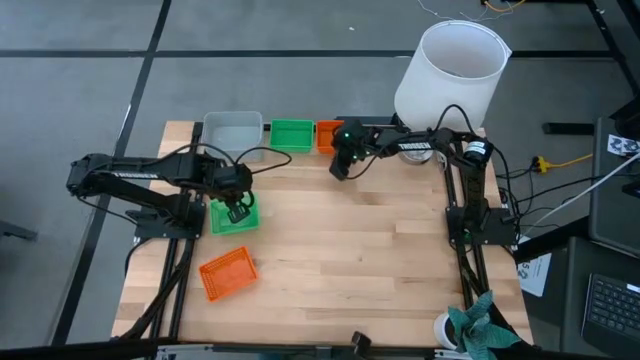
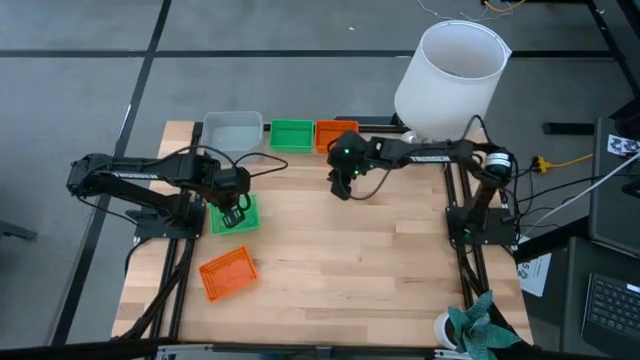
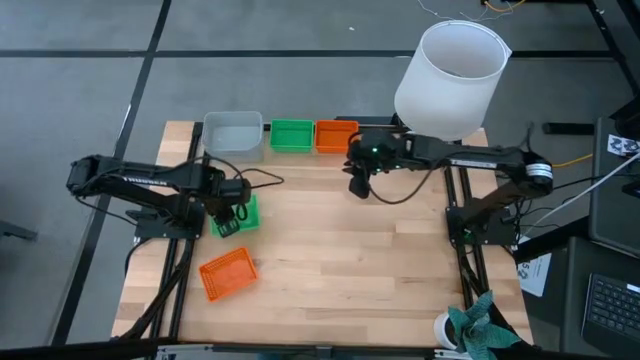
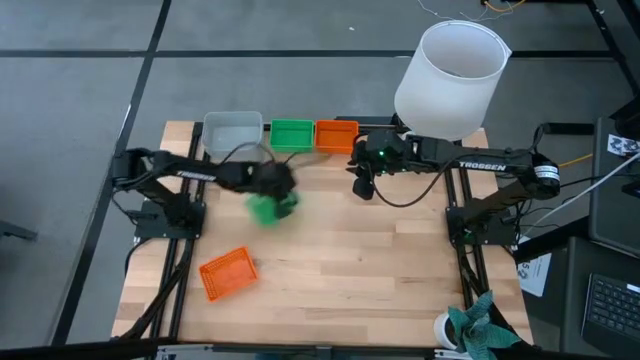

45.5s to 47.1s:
Adjust the green bin

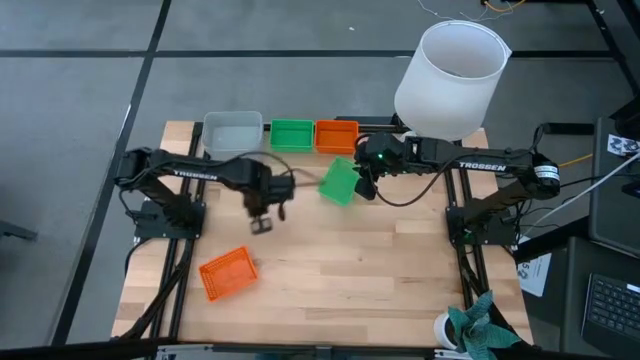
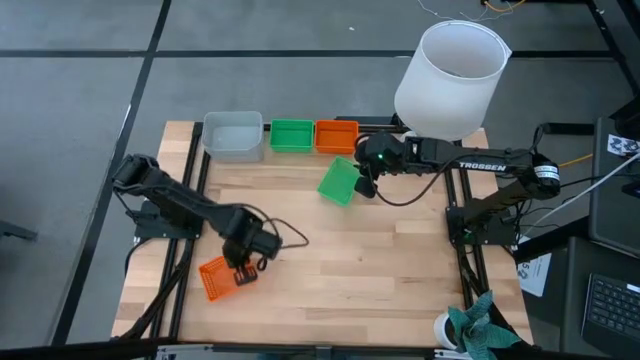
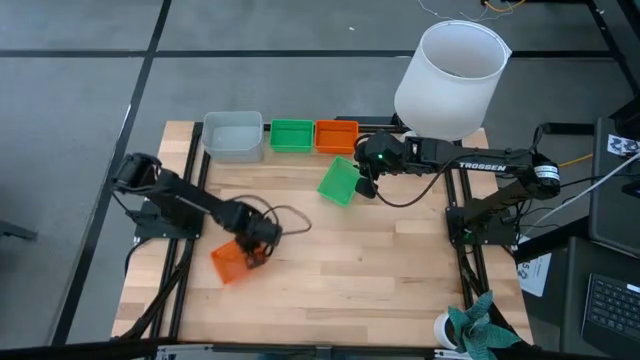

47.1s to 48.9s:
Adjust the orange bin

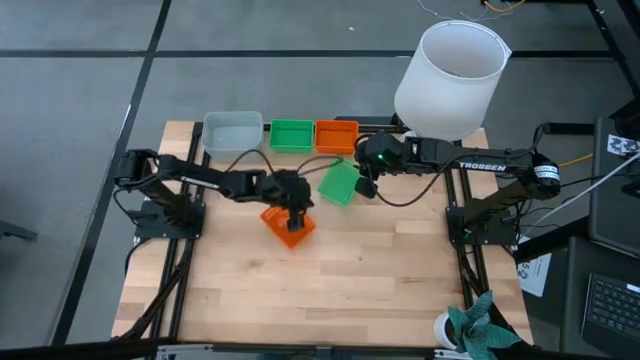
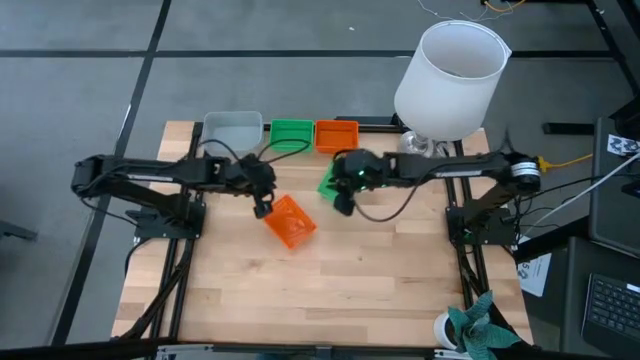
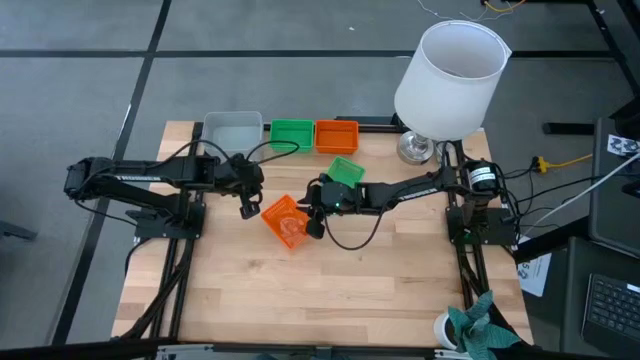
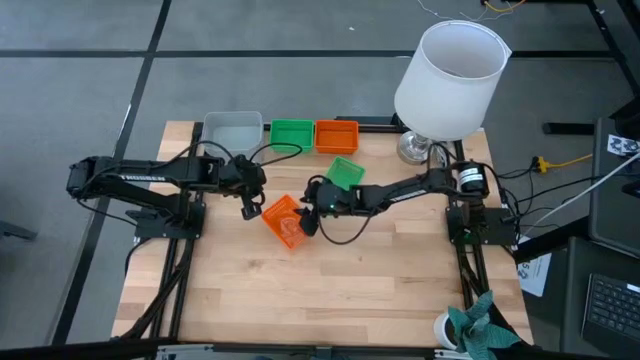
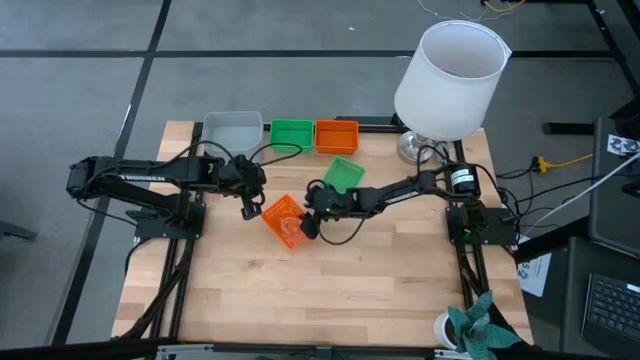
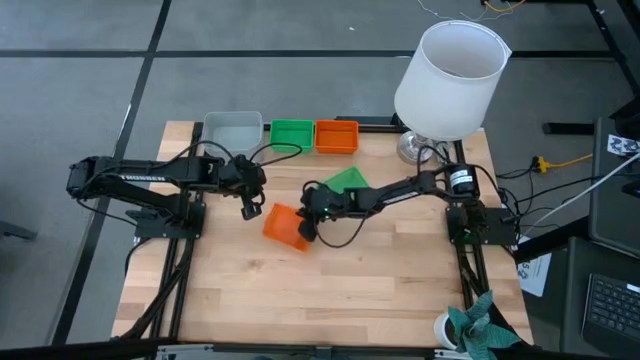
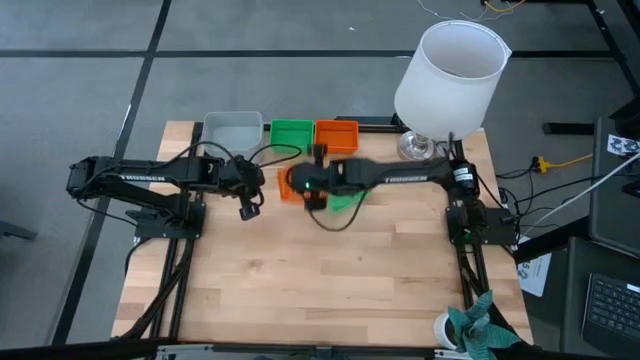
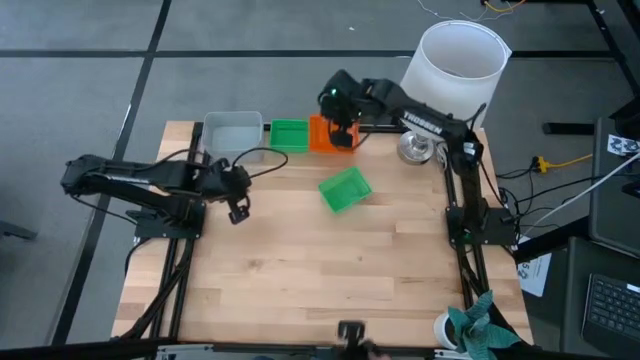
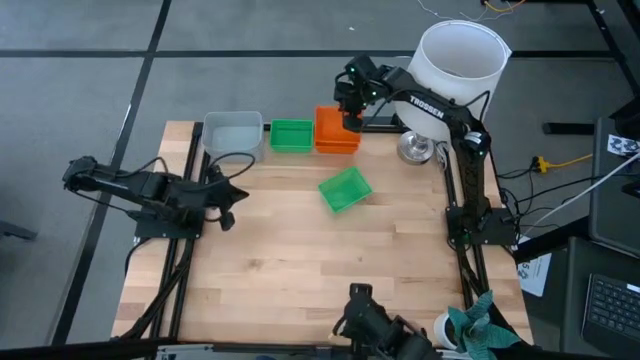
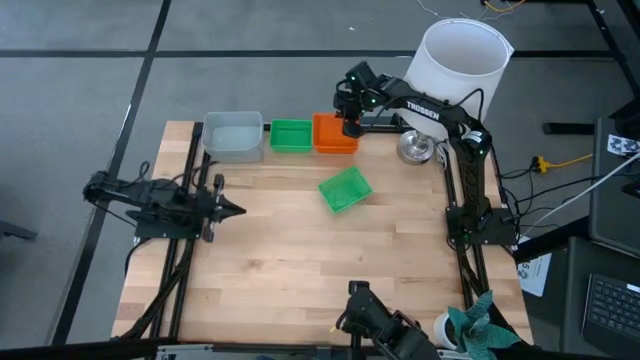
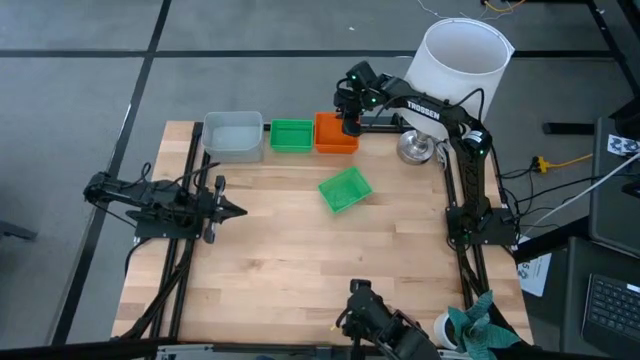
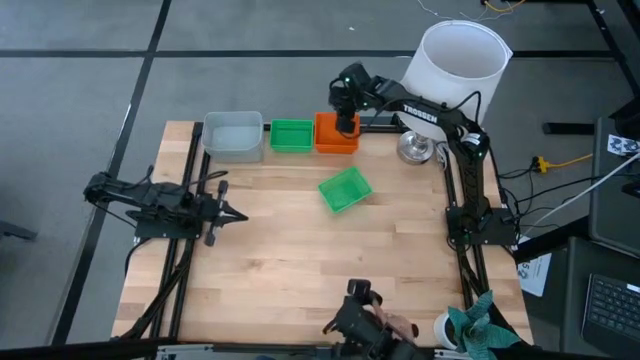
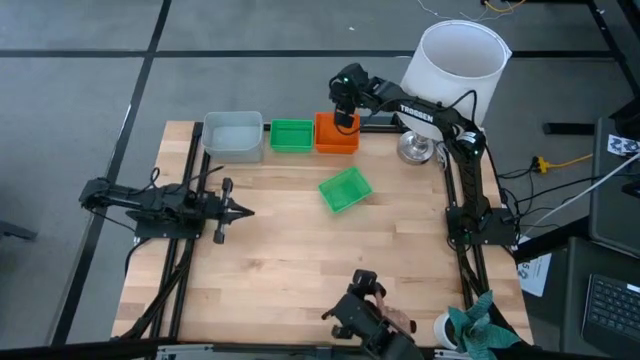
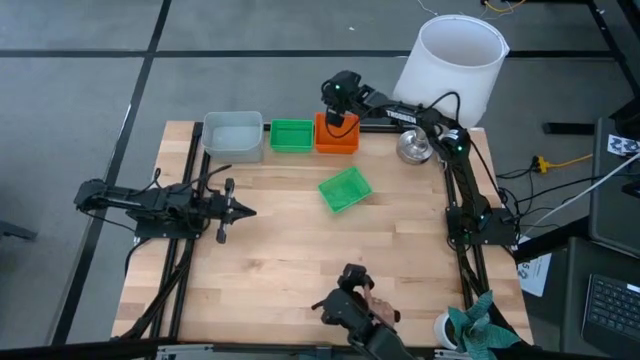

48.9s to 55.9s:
Stack the orange bin into the top orange bin

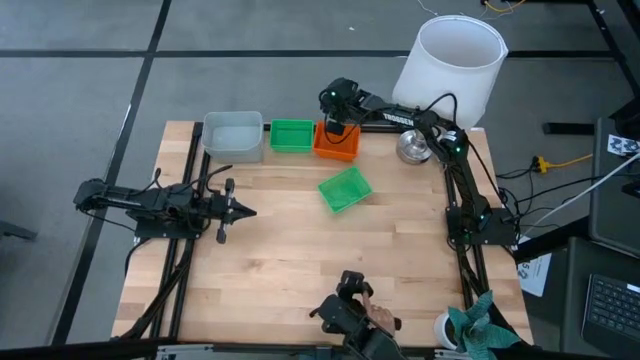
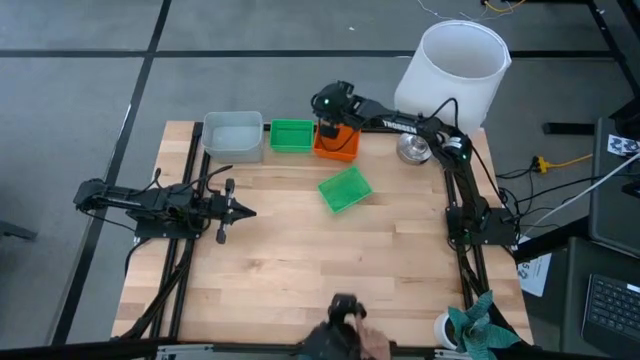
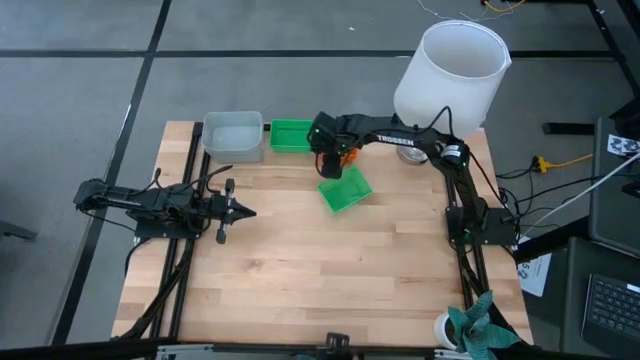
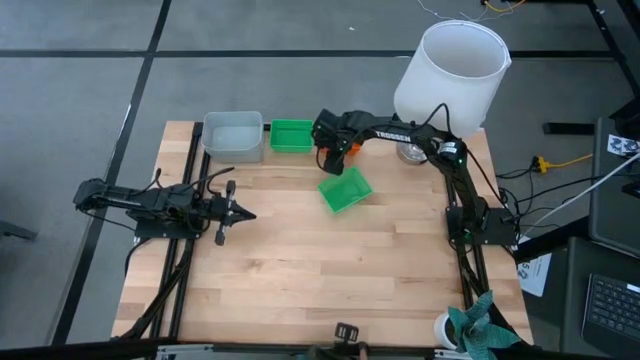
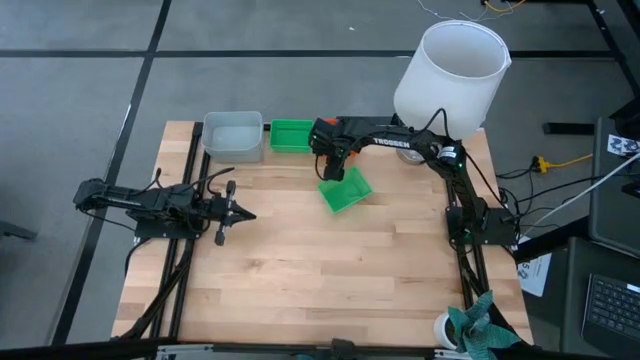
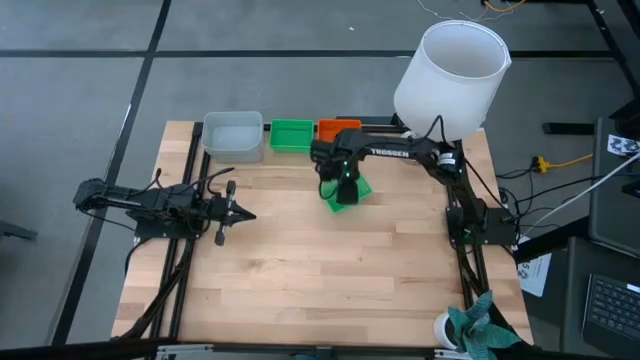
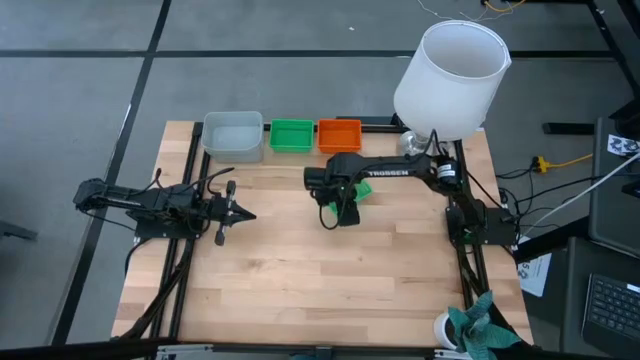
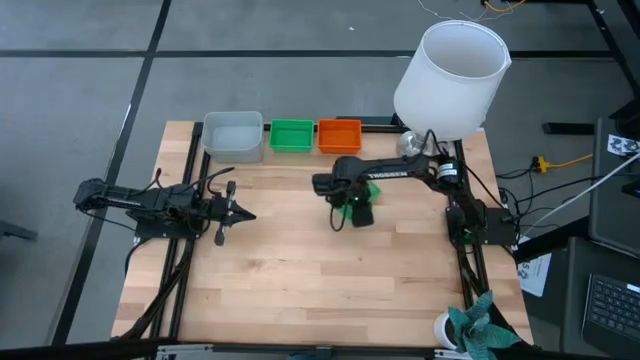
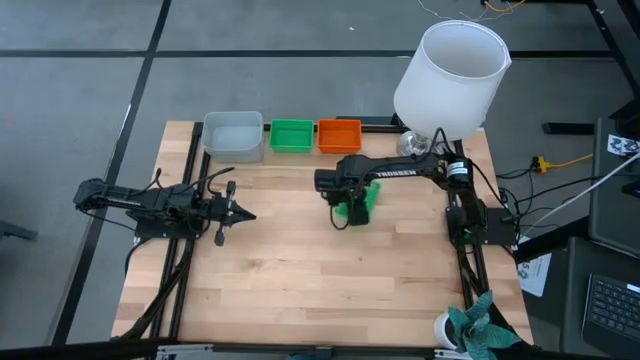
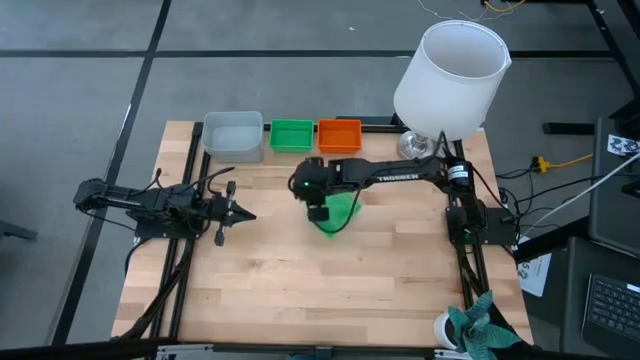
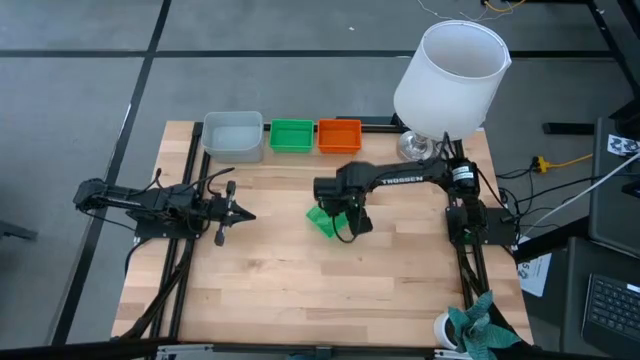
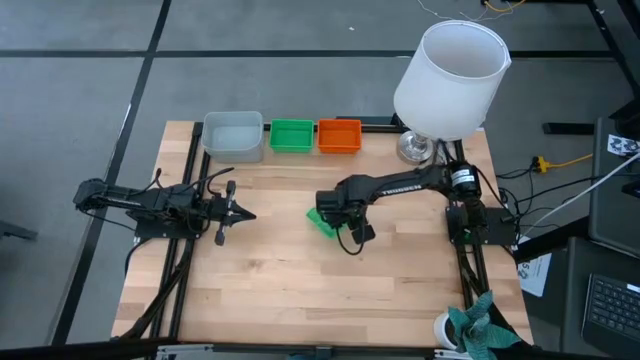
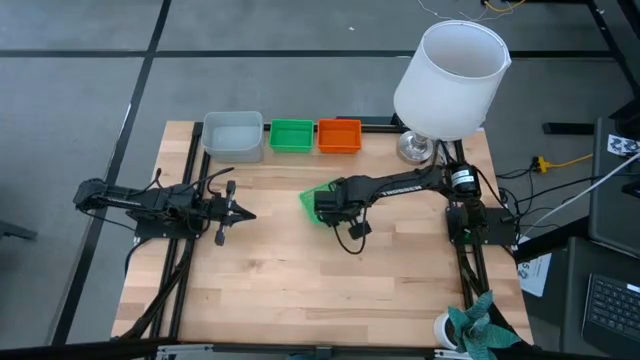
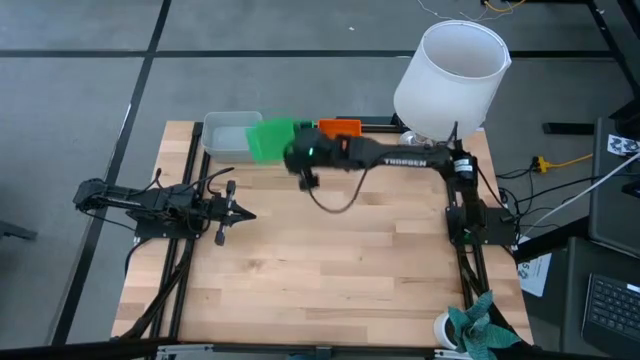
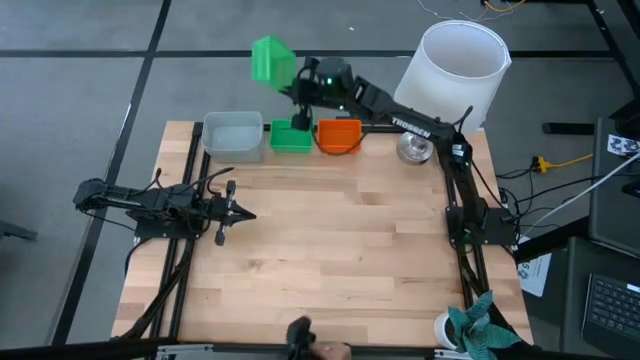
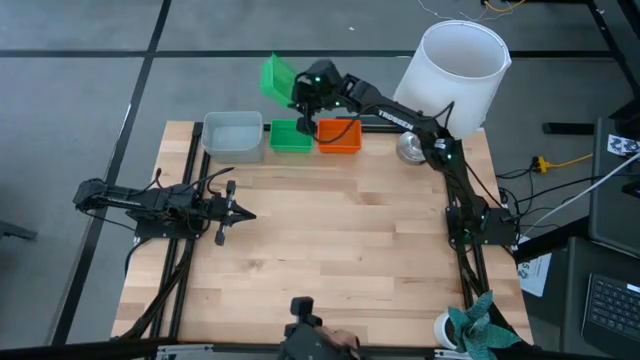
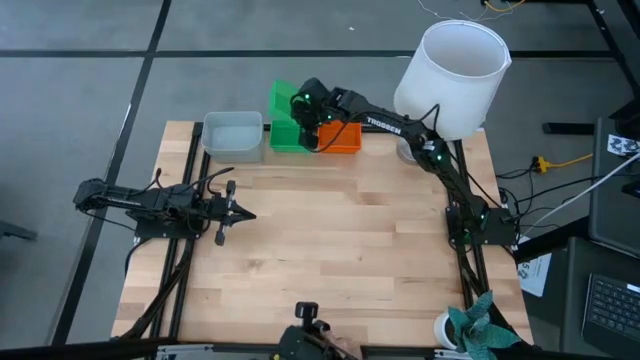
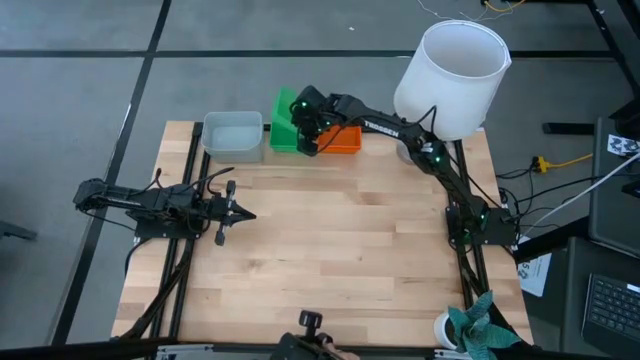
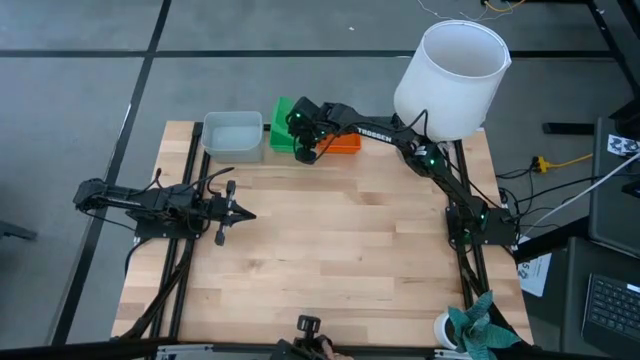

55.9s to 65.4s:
Stack the green bin into the top green bin
